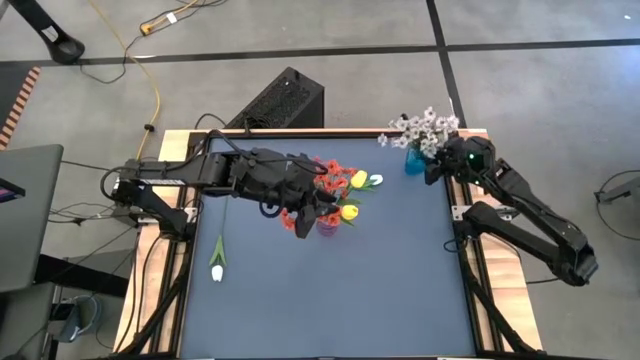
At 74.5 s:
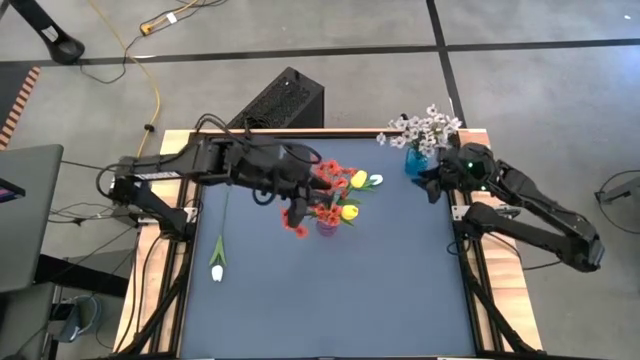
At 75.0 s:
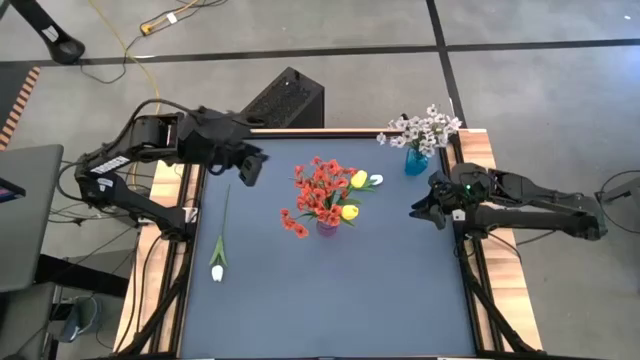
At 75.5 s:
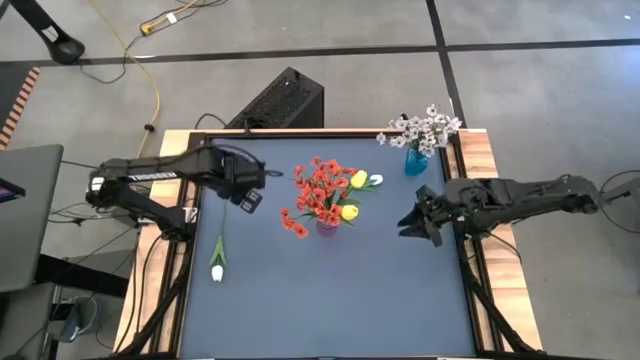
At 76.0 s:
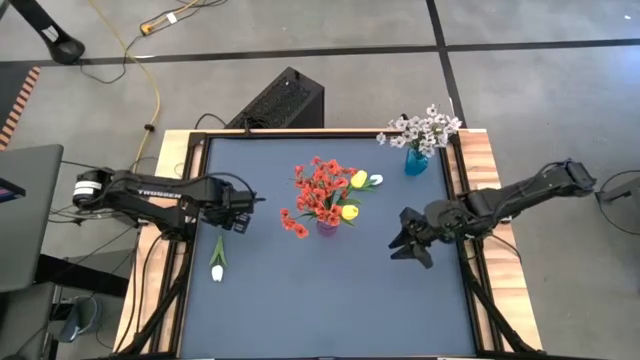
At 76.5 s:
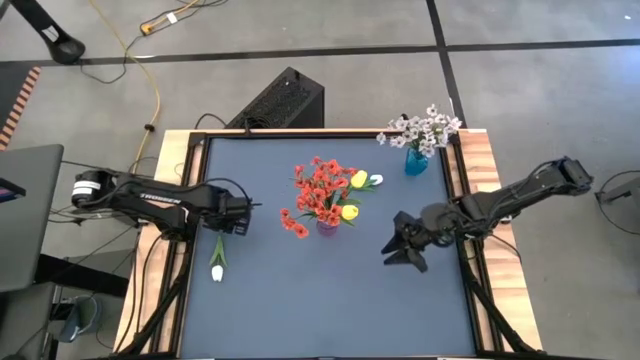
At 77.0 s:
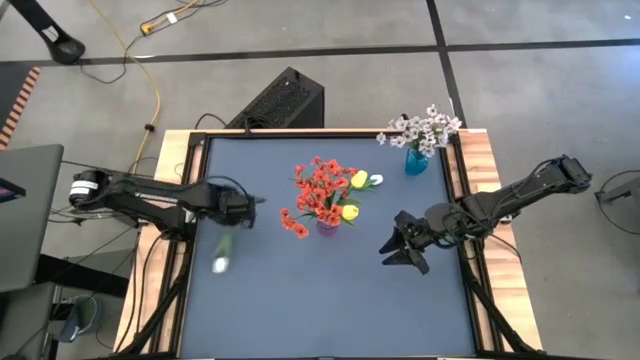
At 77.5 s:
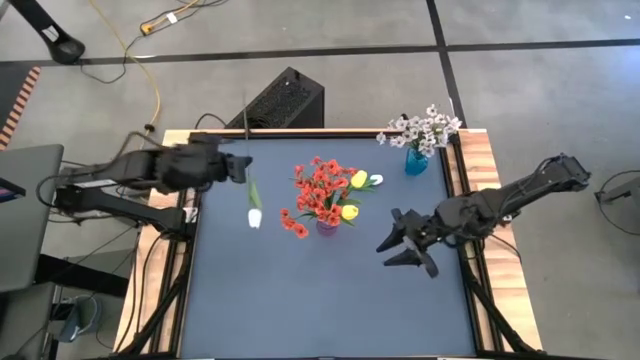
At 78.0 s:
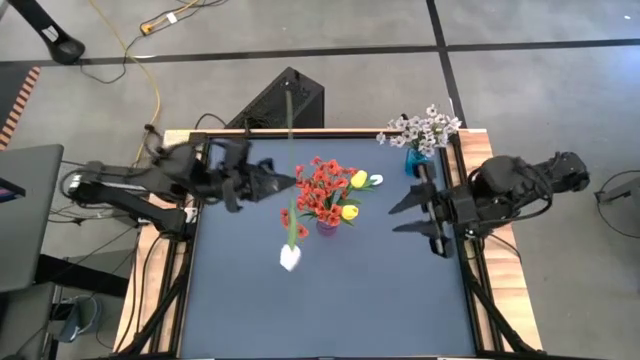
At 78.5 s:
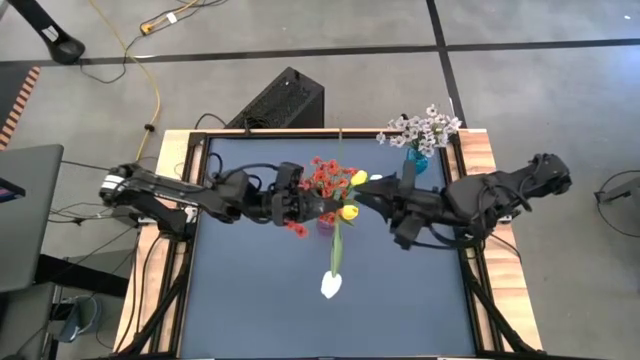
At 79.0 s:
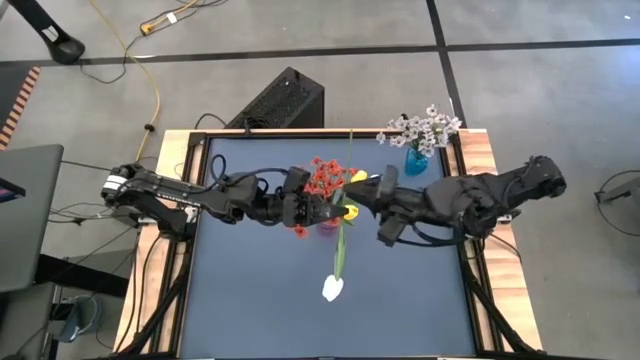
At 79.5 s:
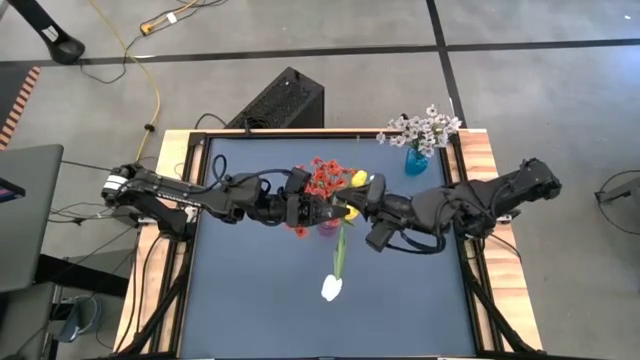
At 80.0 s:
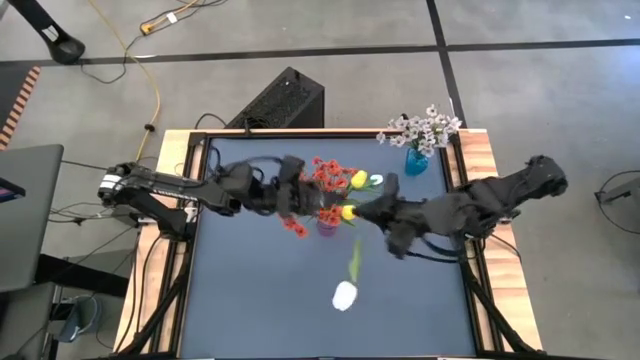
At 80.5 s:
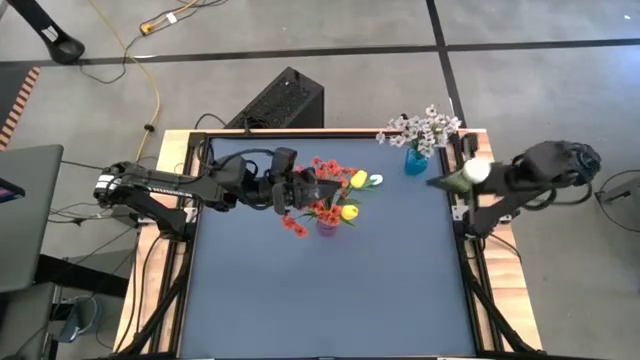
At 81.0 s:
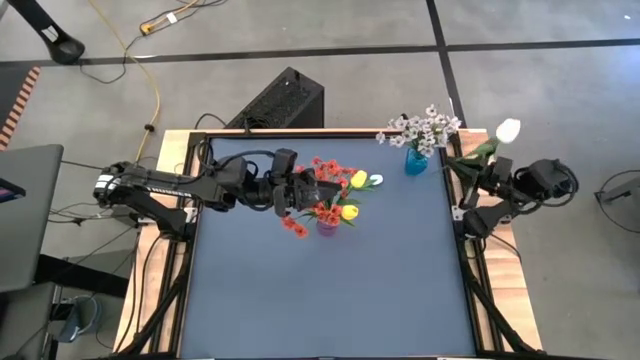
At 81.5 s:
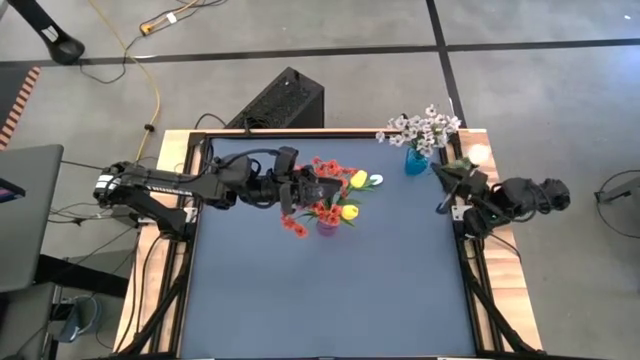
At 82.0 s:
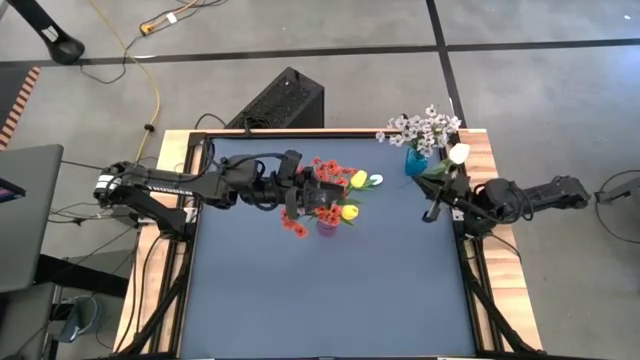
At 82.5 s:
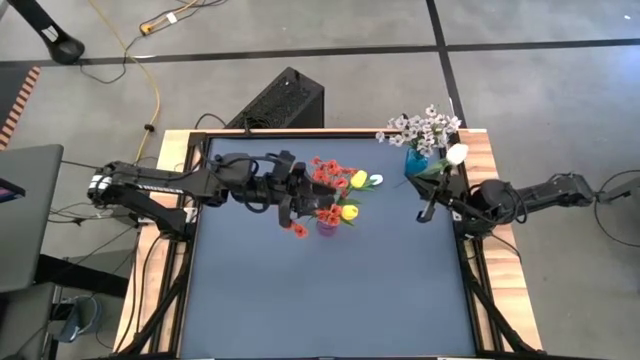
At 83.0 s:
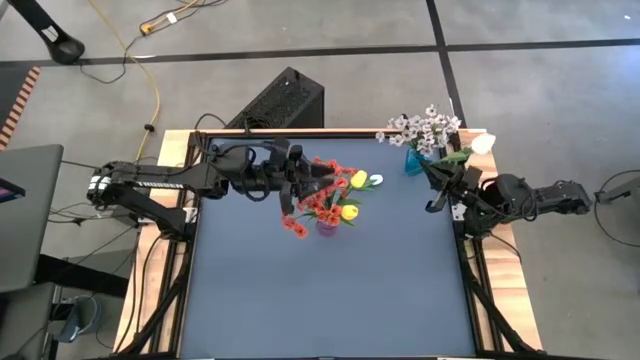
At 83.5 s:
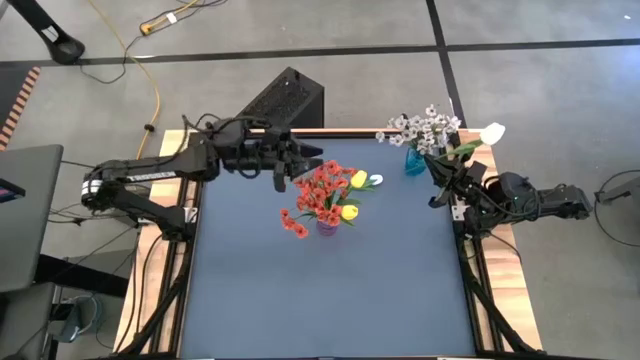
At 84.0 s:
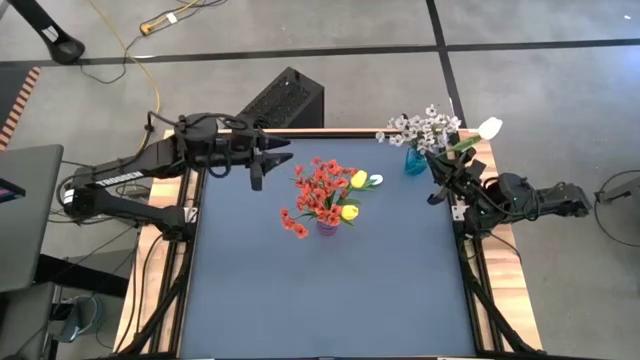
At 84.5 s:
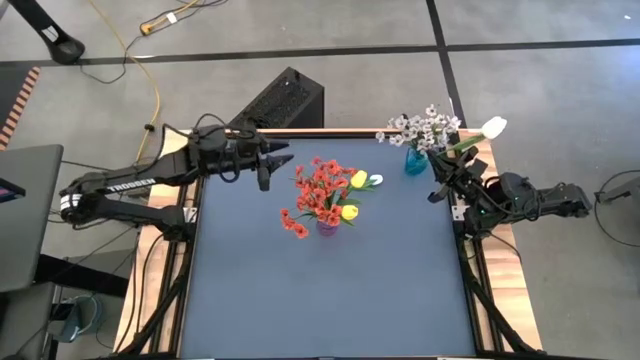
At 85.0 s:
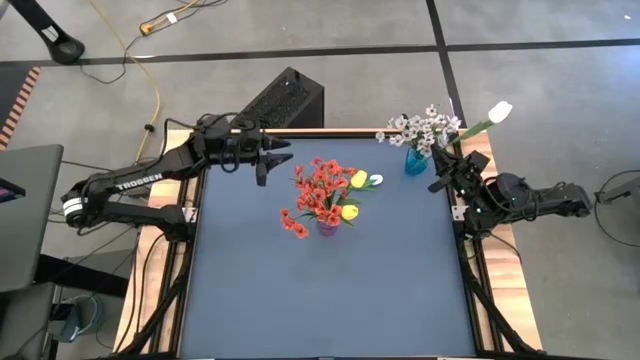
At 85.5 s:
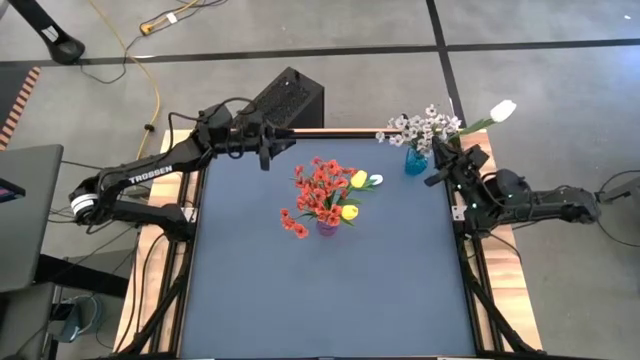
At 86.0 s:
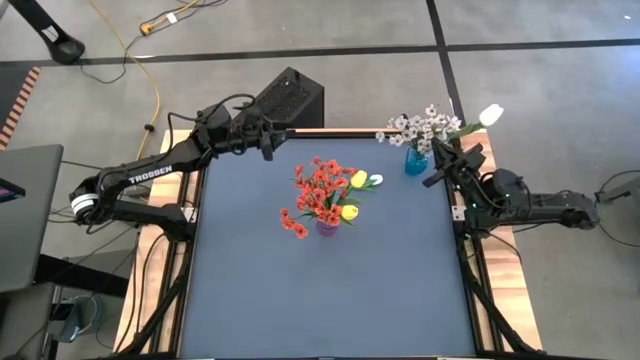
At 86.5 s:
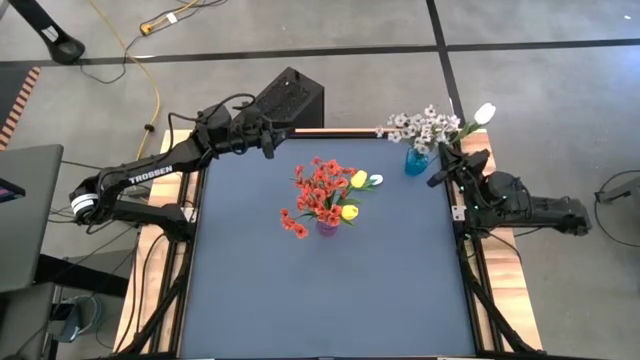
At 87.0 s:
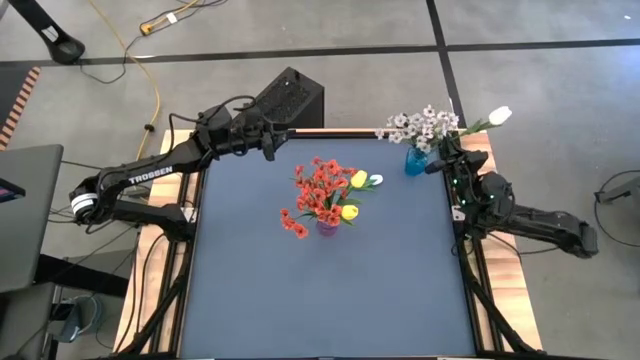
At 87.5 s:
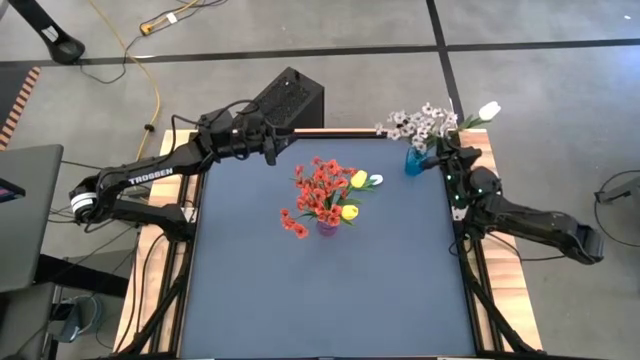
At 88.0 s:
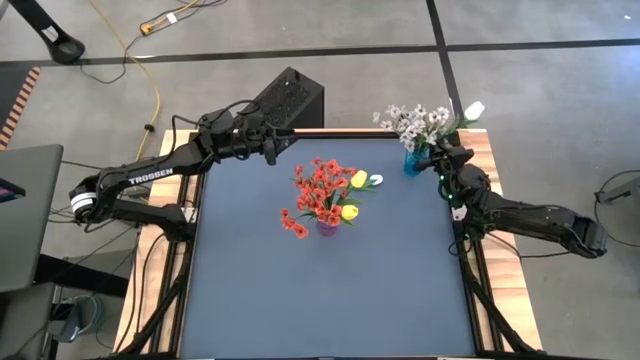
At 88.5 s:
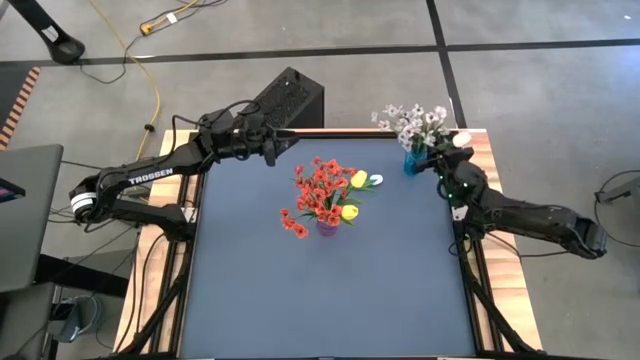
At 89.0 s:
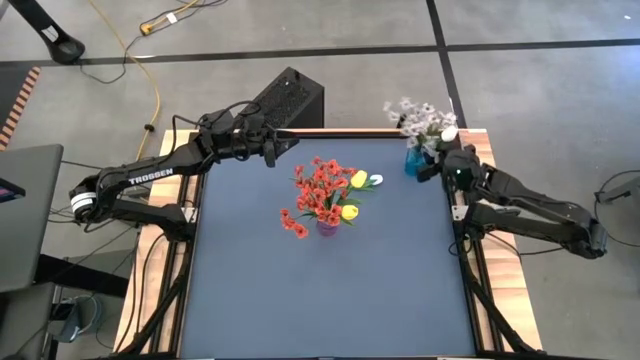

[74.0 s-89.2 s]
Task: Sort flowers into vase by color
Put the white flower into the blue vase

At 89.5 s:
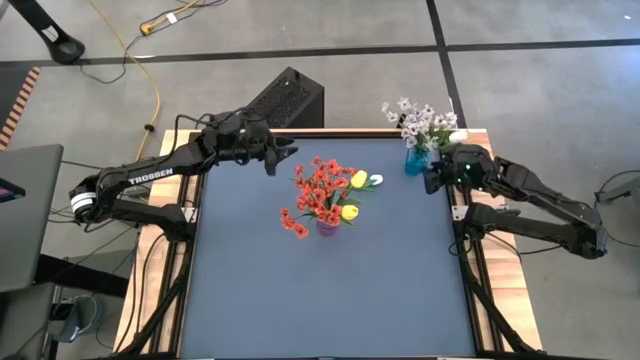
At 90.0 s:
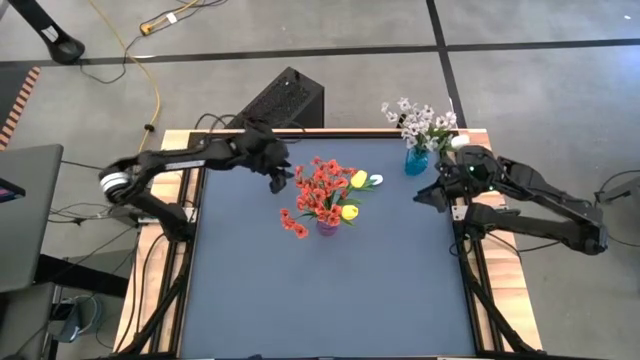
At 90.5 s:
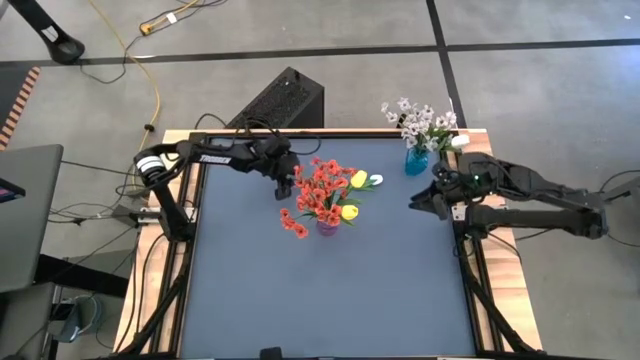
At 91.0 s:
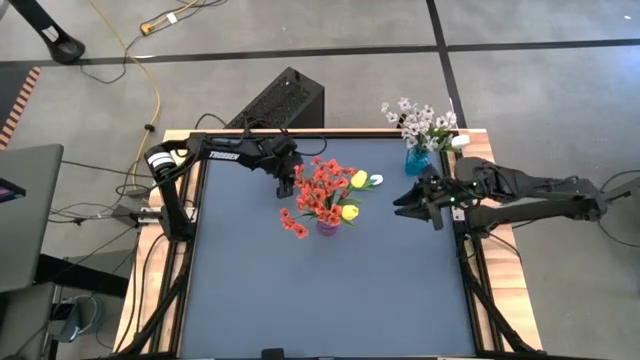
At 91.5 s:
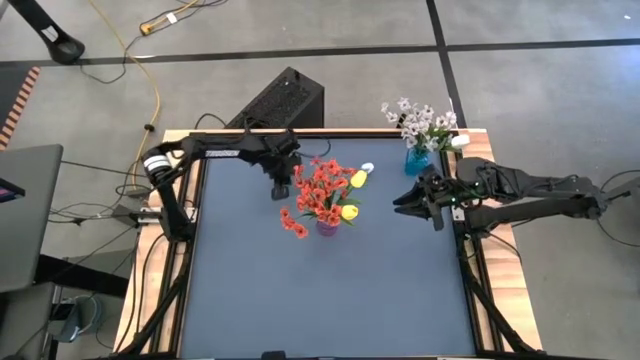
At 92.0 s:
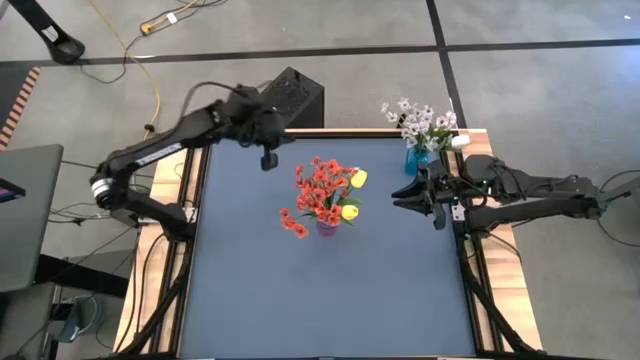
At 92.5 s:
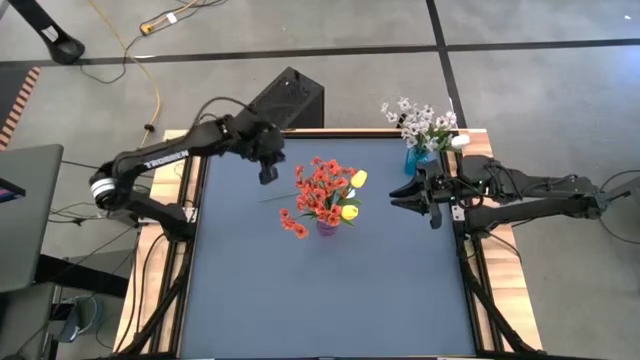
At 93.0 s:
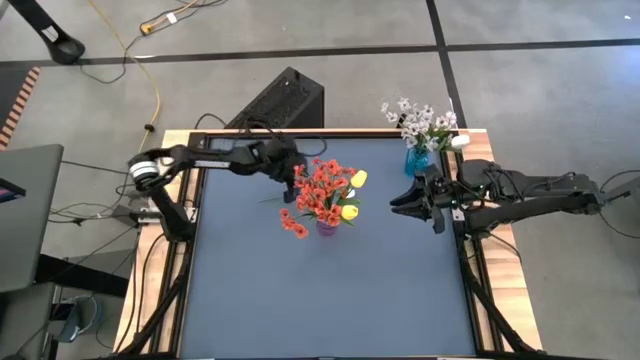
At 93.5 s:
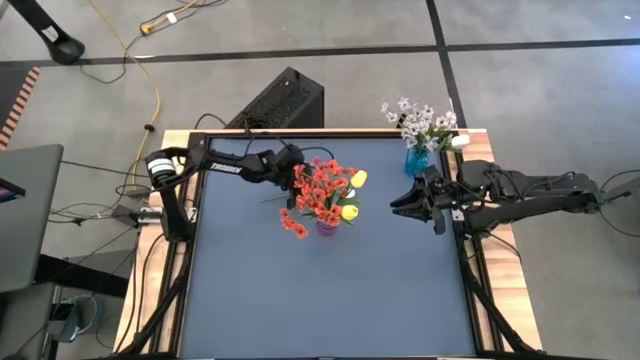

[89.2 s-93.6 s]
Put the white flower into the blue vase

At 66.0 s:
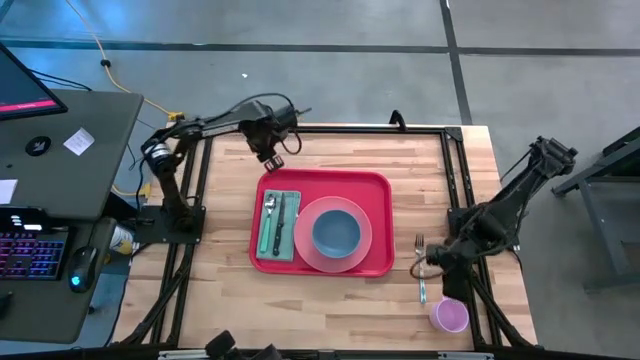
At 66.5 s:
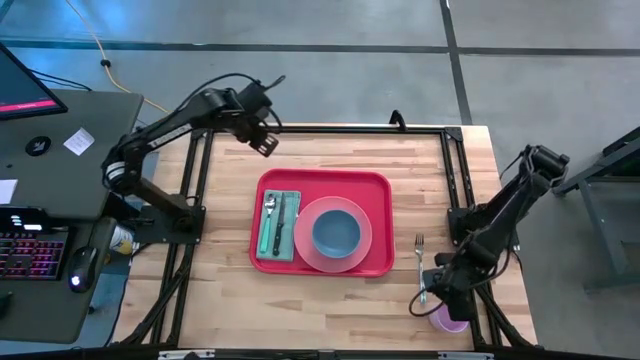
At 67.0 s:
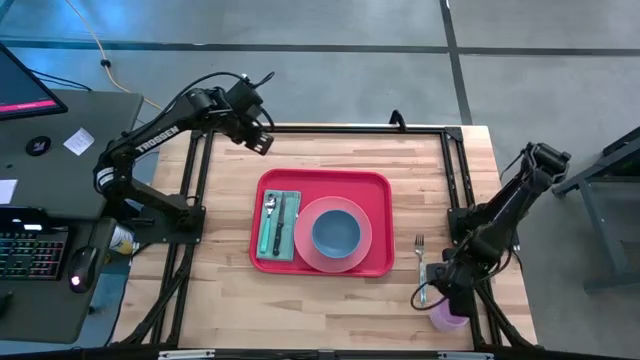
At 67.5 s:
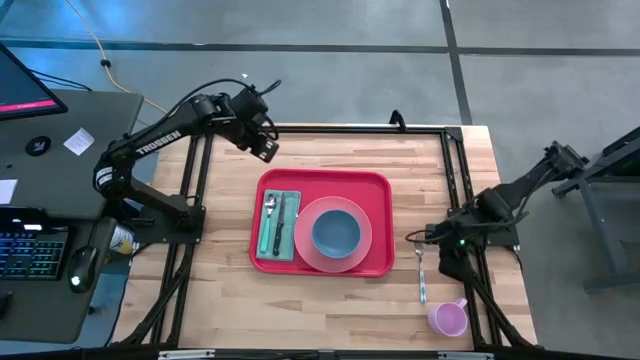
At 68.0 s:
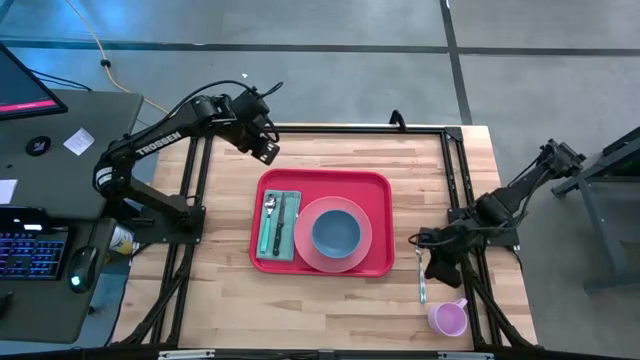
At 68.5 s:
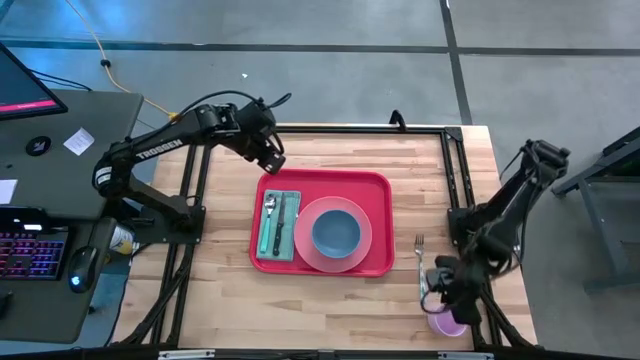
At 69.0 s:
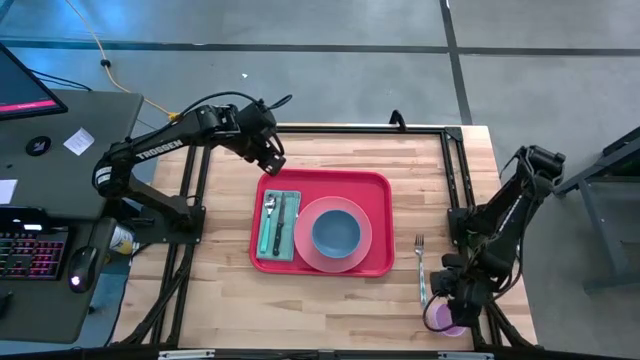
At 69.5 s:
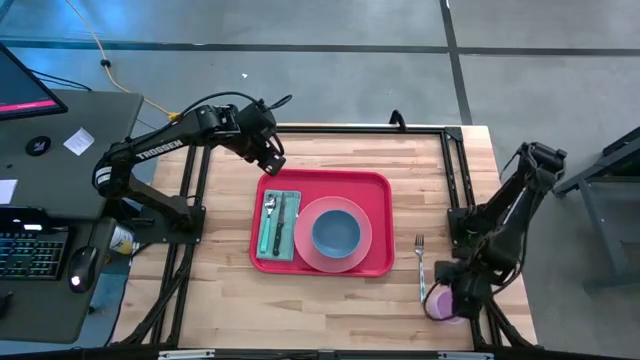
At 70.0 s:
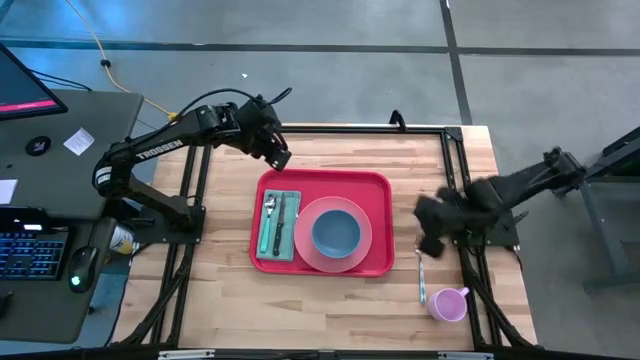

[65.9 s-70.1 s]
Task: Set up tray
Put the pink mug on the red tray to the top right of the pink plate
